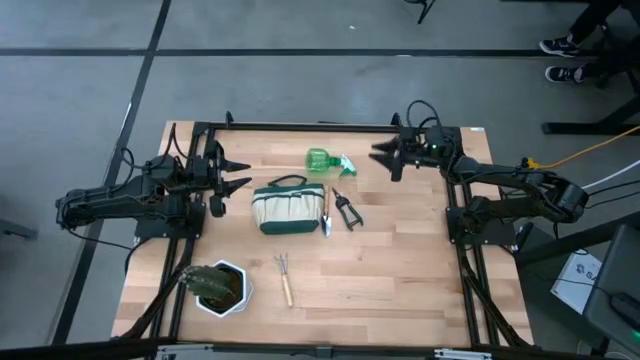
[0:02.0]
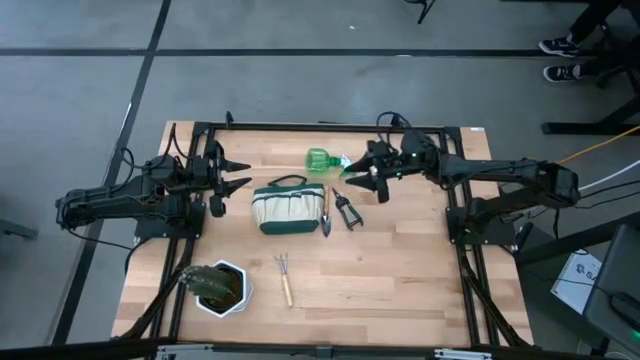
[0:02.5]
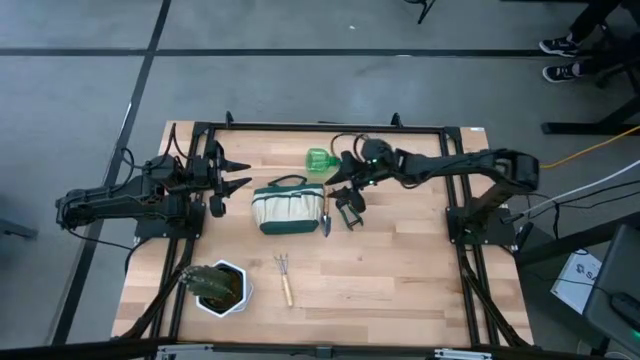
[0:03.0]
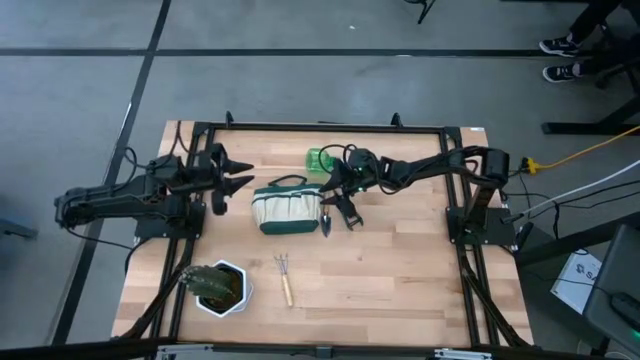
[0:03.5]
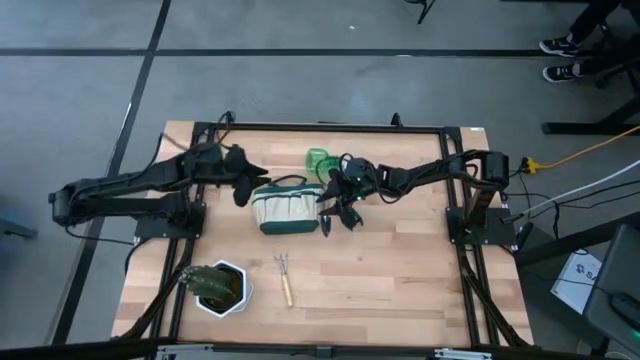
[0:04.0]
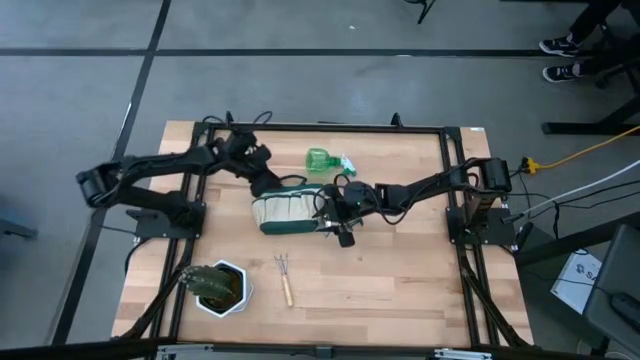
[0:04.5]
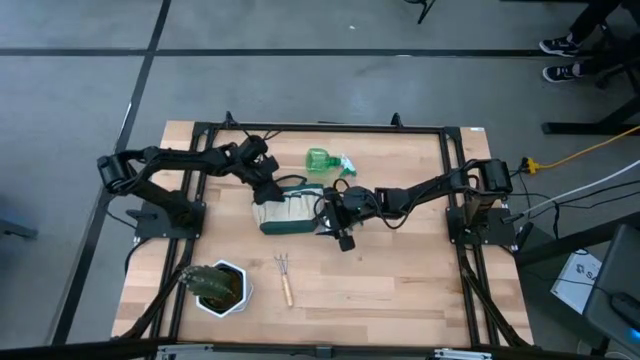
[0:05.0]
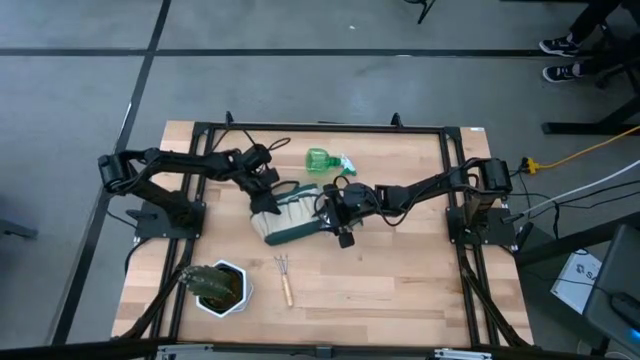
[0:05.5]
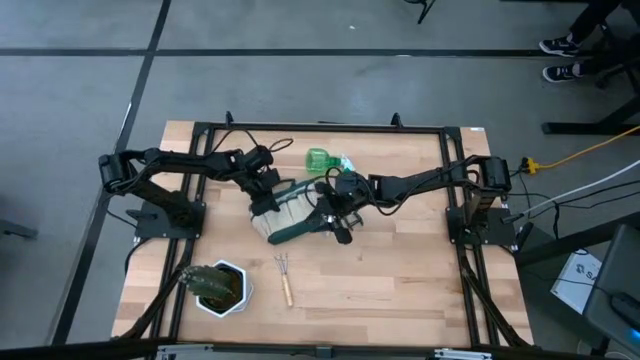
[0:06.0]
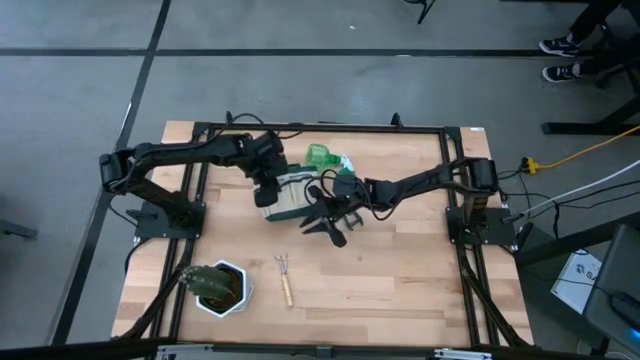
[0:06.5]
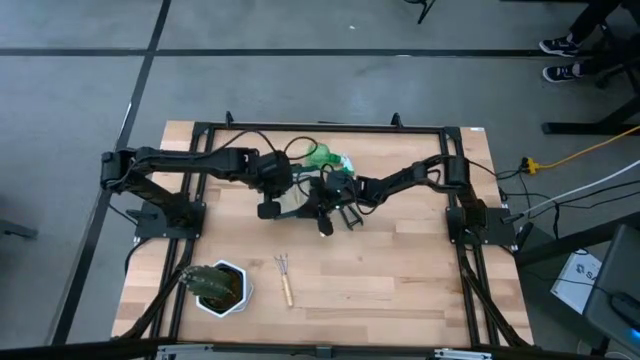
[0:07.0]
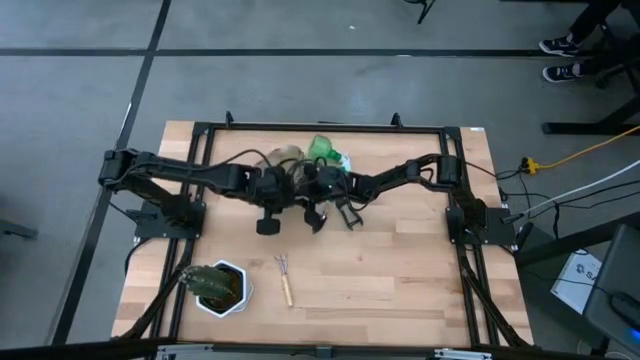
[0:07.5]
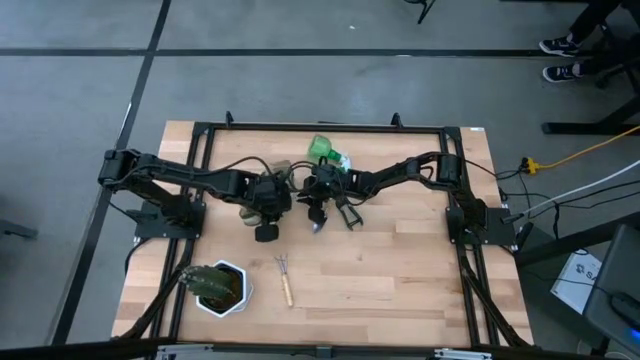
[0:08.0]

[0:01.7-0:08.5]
Task: Pick & Place Garden tools in Gardening bag
Prepare the white gardening bag

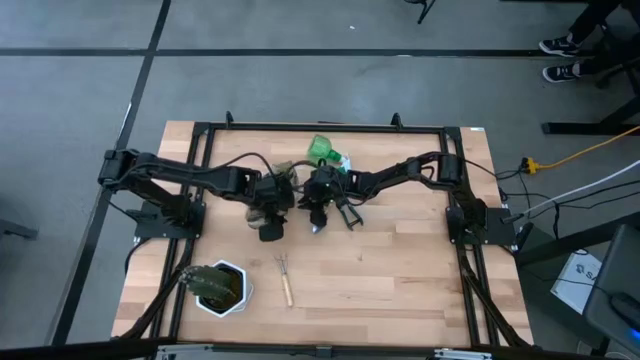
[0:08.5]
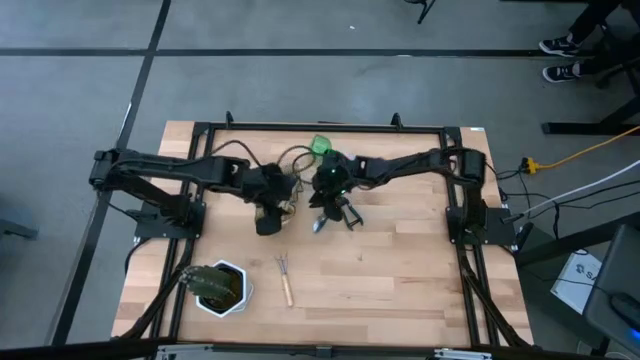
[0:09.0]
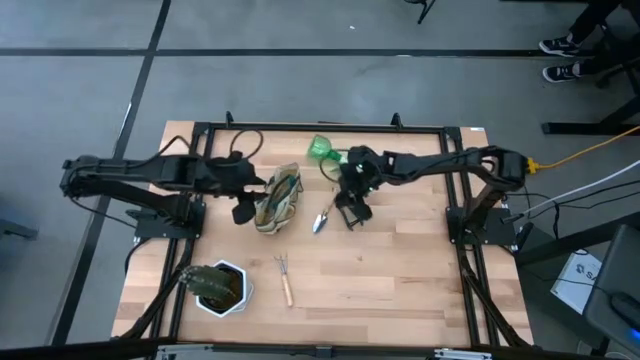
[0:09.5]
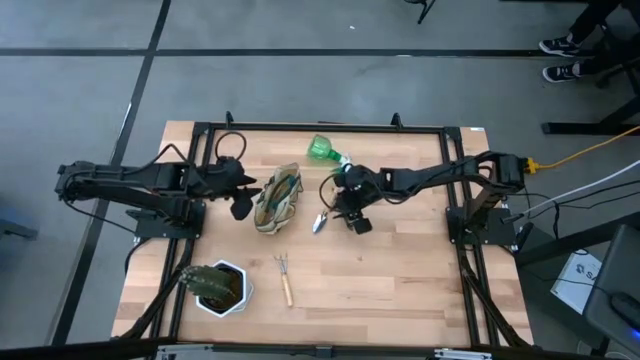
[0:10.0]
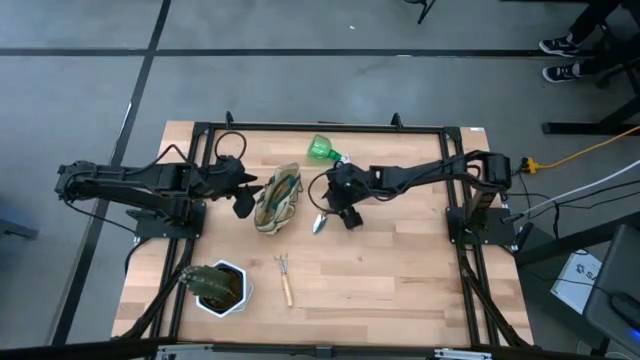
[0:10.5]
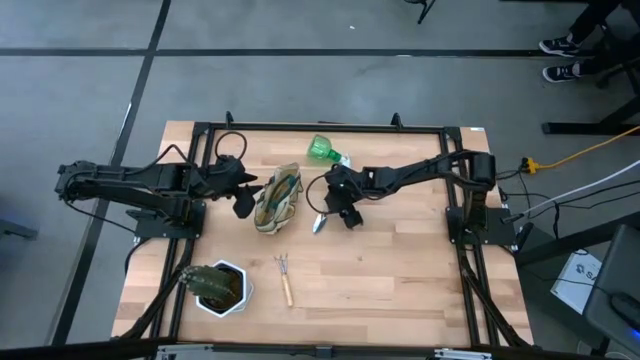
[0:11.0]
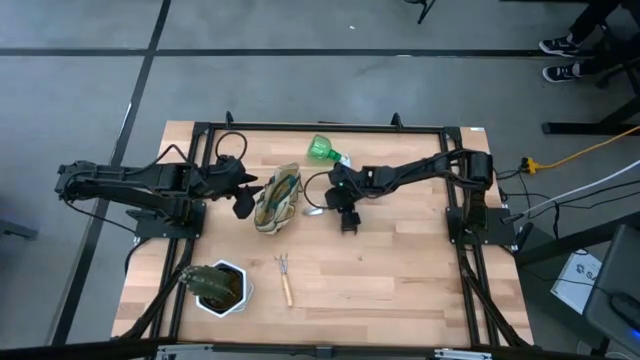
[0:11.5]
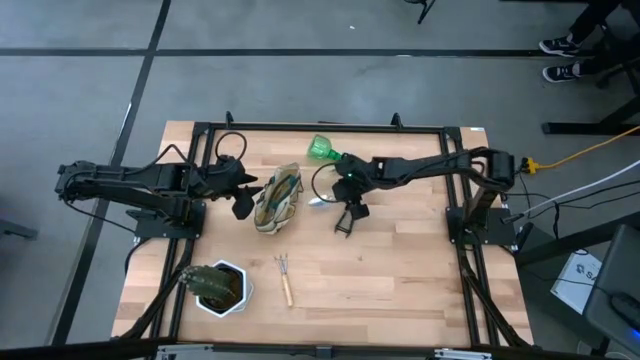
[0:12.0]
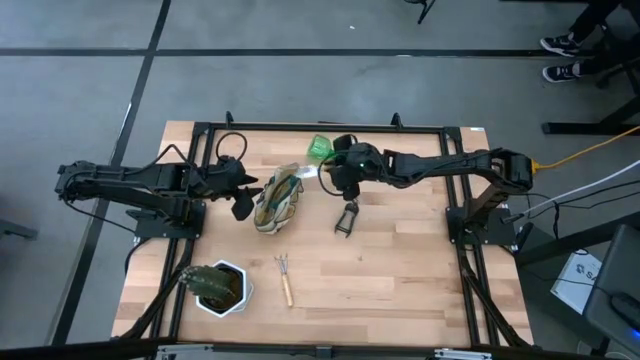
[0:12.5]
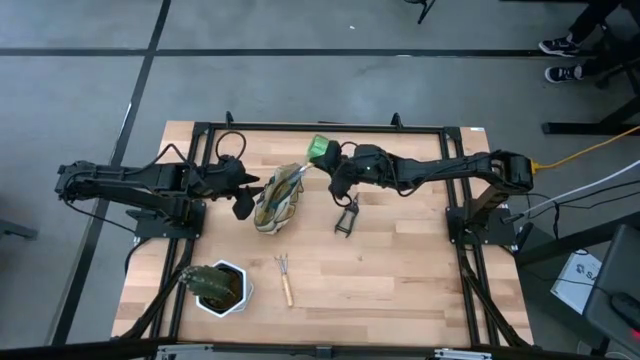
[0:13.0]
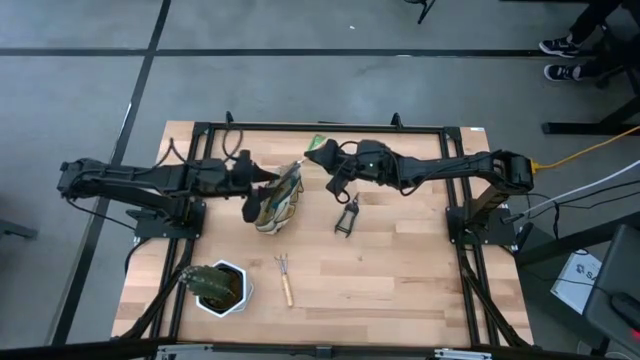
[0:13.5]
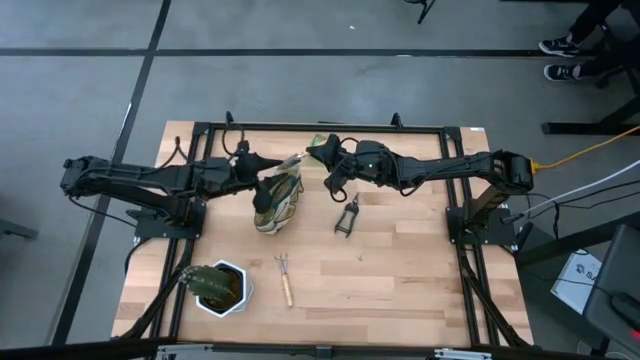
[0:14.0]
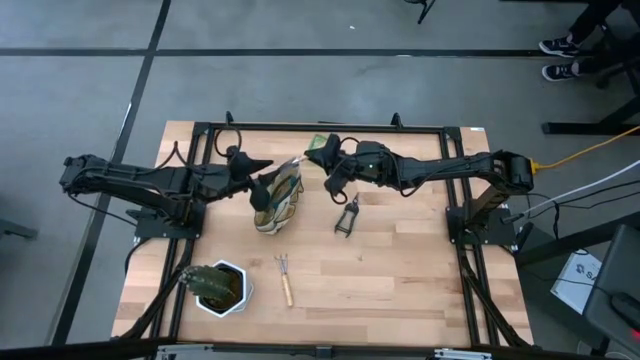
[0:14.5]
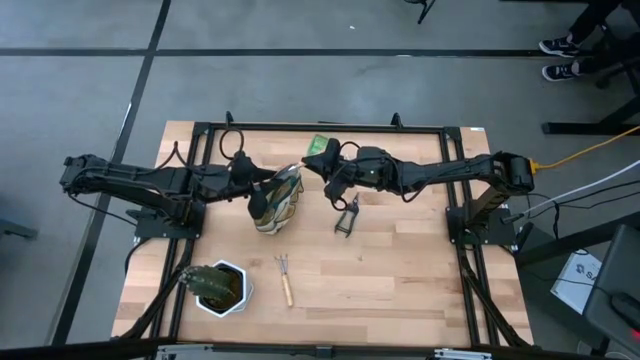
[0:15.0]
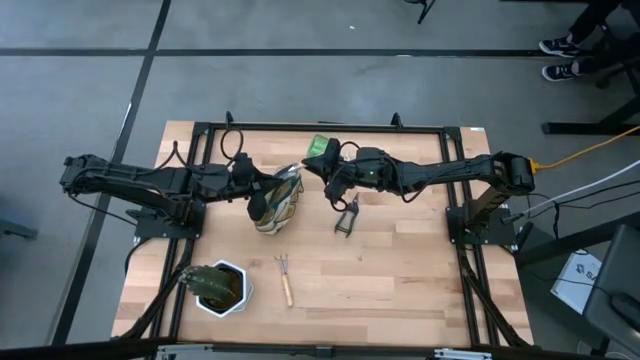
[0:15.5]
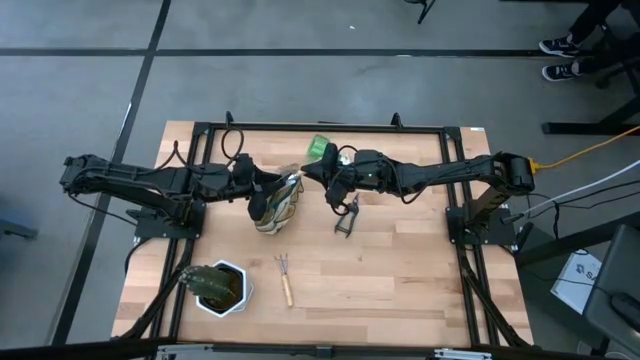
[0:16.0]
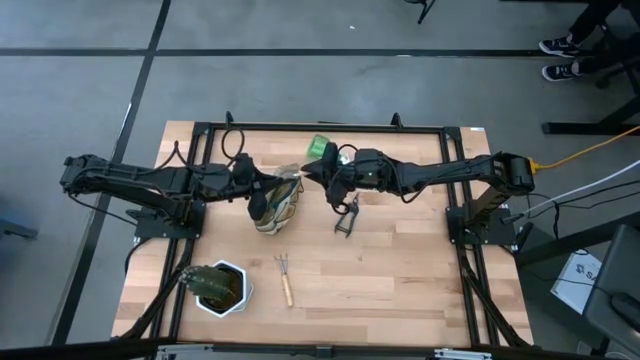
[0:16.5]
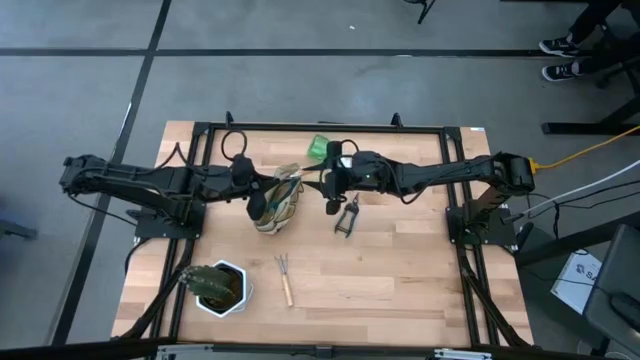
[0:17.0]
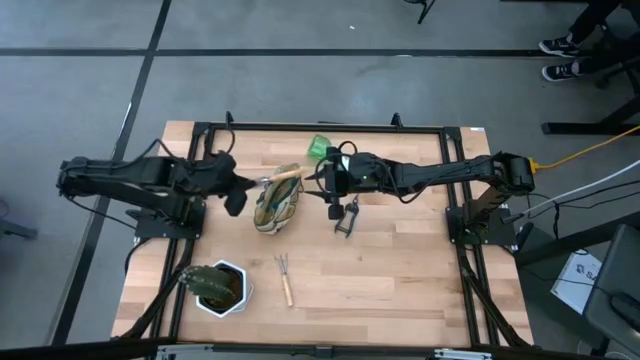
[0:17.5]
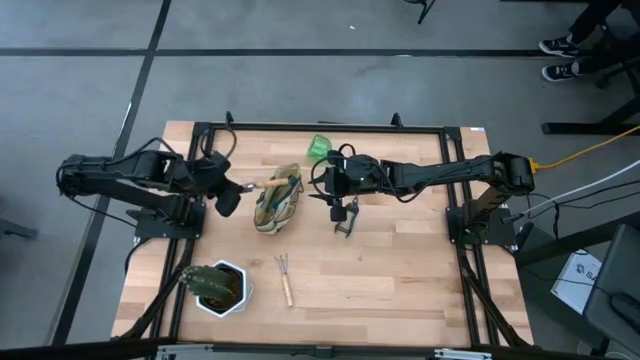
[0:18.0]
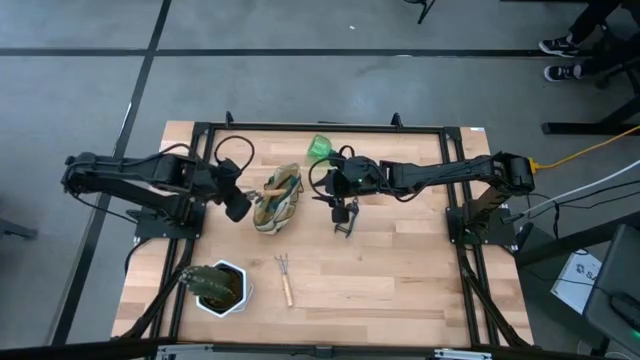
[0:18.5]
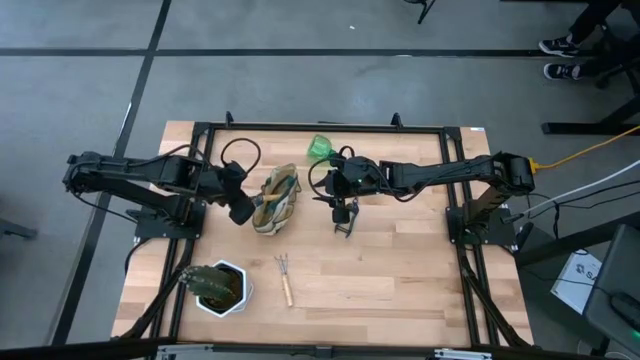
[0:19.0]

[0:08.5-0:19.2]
Put the brown trowel into the white gardening bag

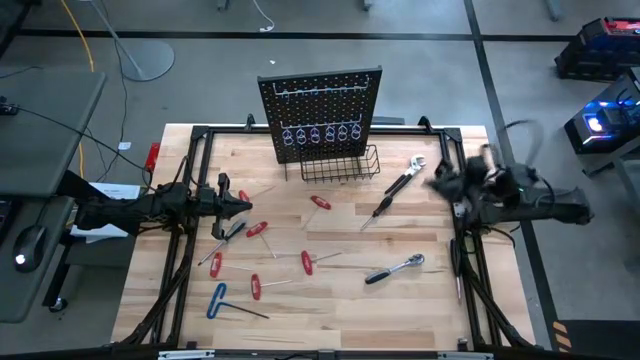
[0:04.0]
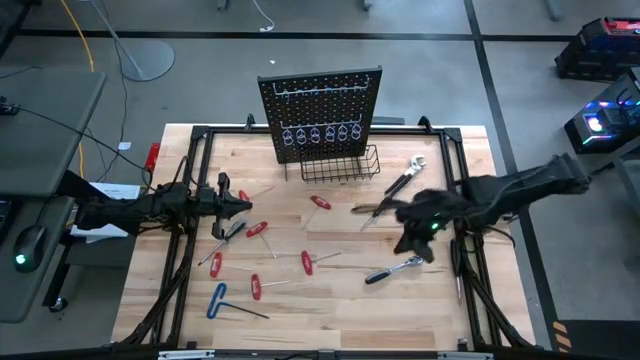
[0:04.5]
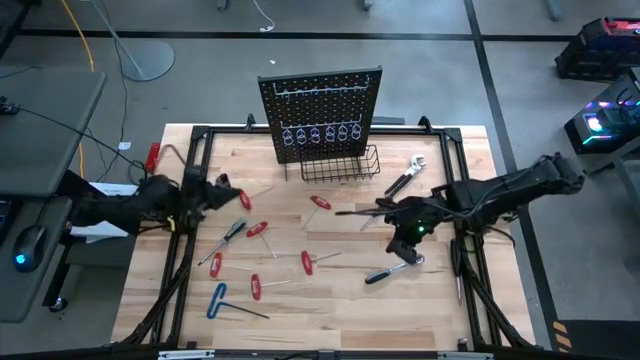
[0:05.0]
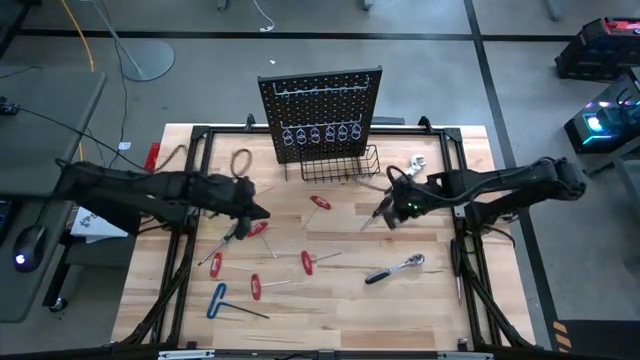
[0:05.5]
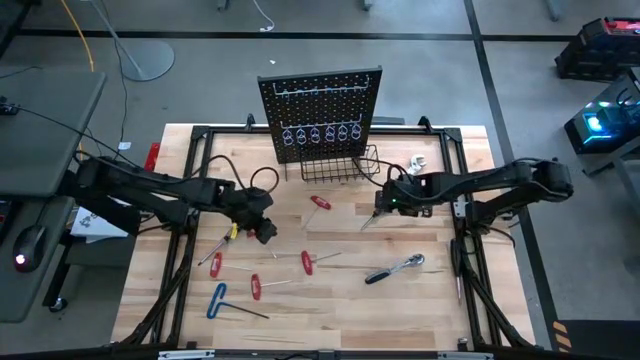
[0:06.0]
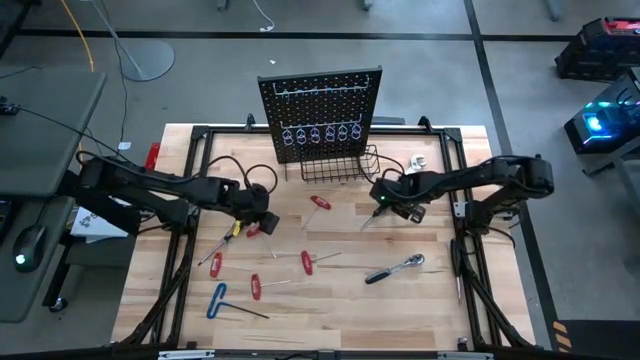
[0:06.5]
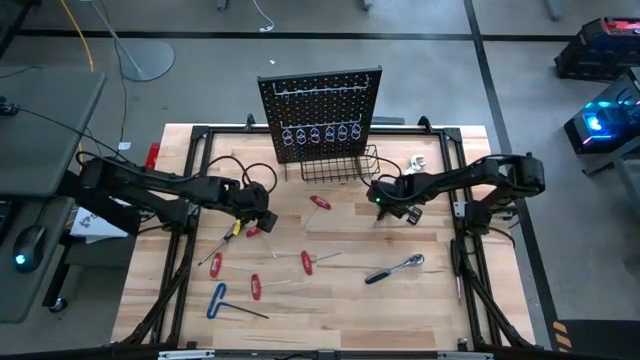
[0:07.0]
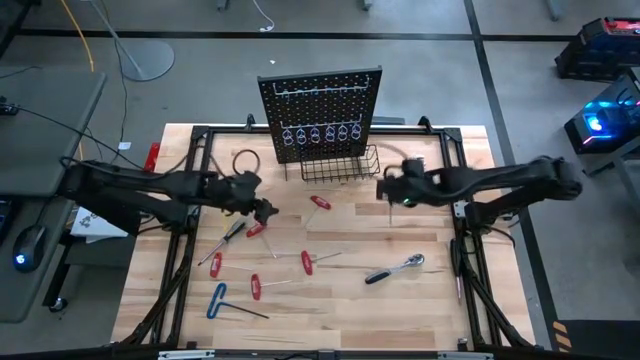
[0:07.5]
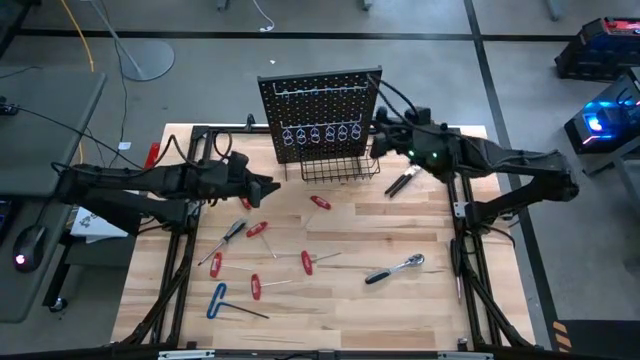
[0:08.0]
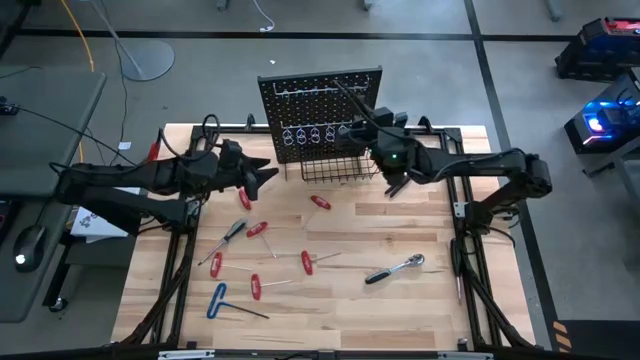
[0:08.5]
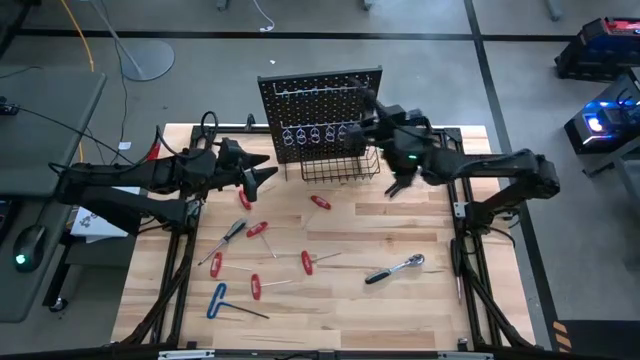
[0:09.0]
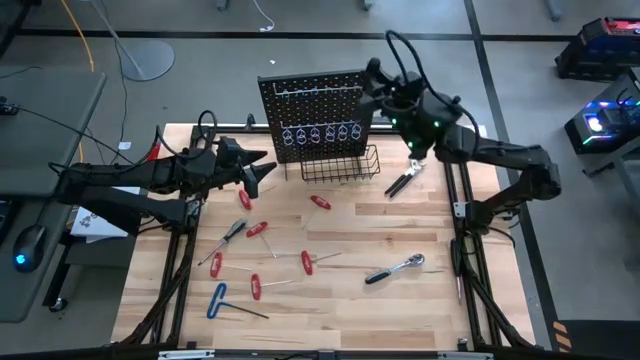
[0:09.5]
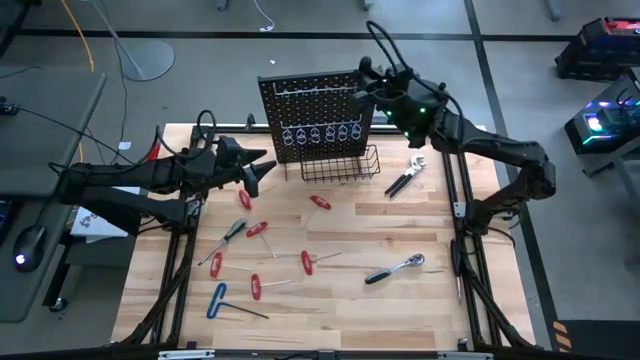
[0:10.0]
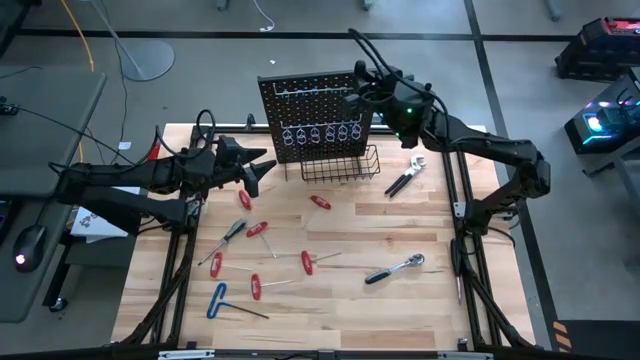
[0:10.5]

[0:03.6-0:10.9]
Task: Hang tools onto peg board
Hang the black screwdriver on the peg board
